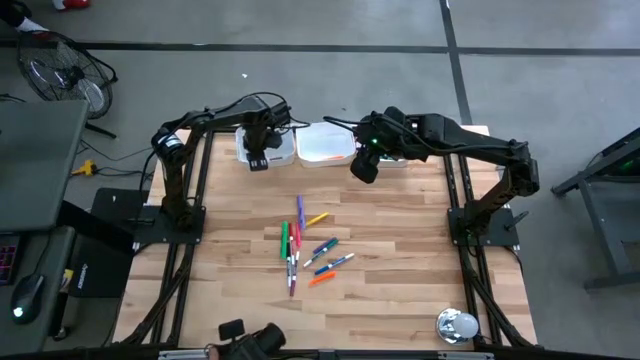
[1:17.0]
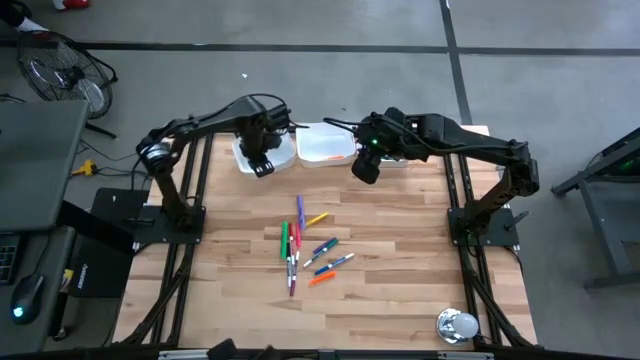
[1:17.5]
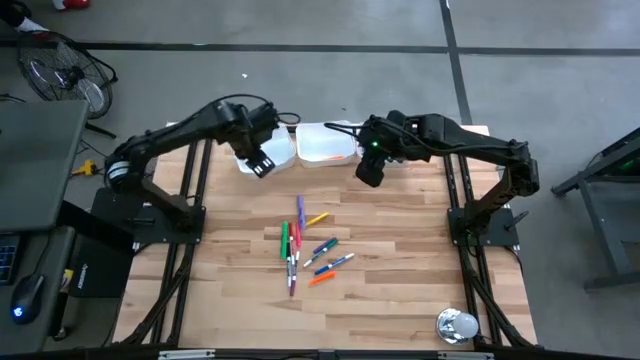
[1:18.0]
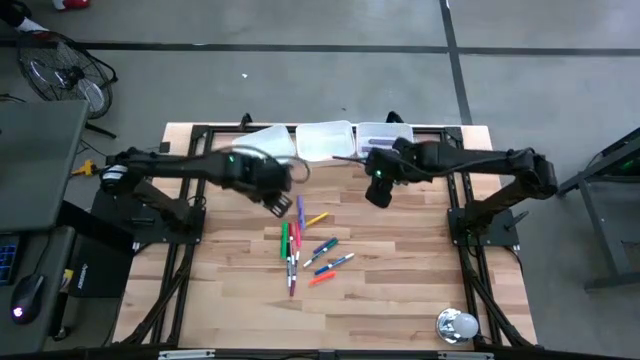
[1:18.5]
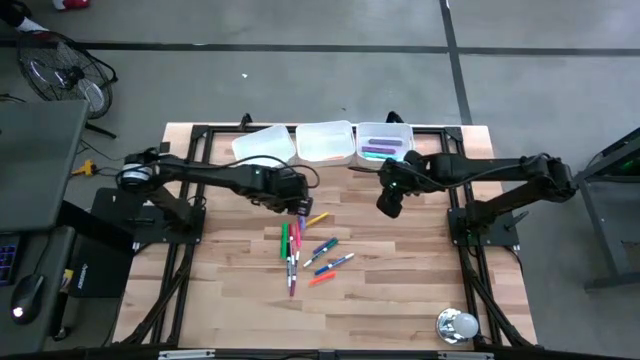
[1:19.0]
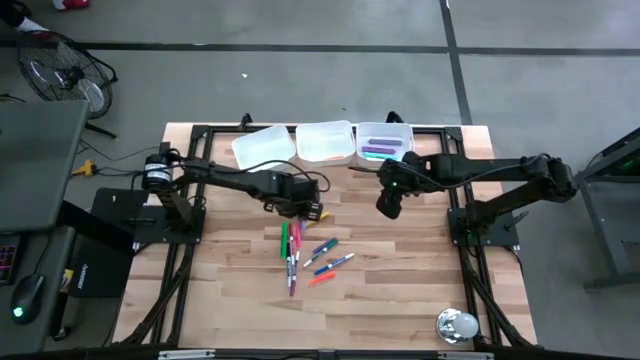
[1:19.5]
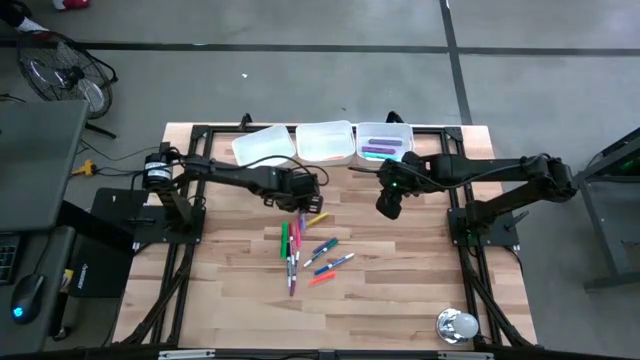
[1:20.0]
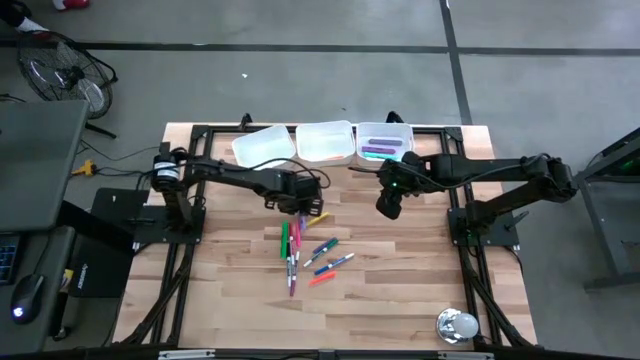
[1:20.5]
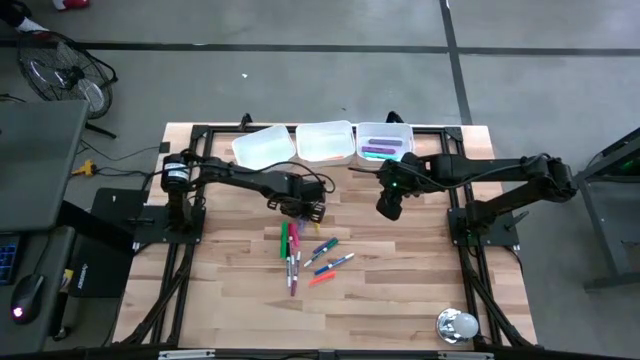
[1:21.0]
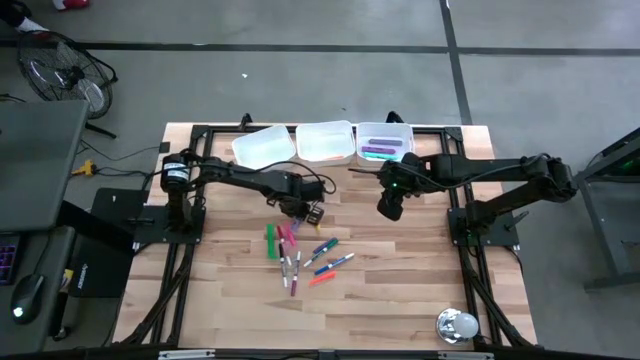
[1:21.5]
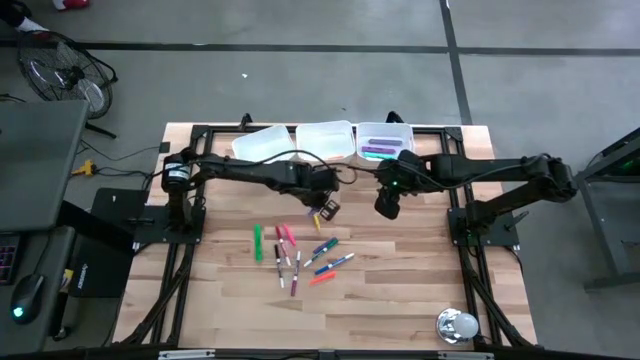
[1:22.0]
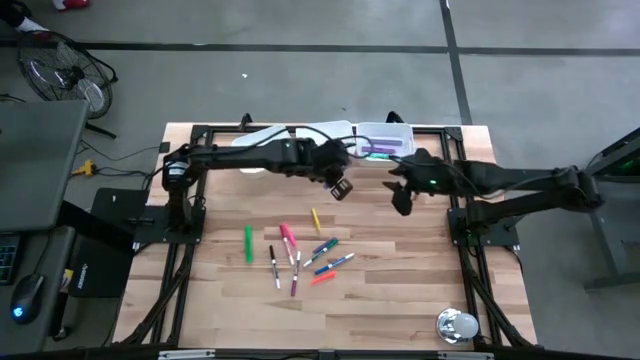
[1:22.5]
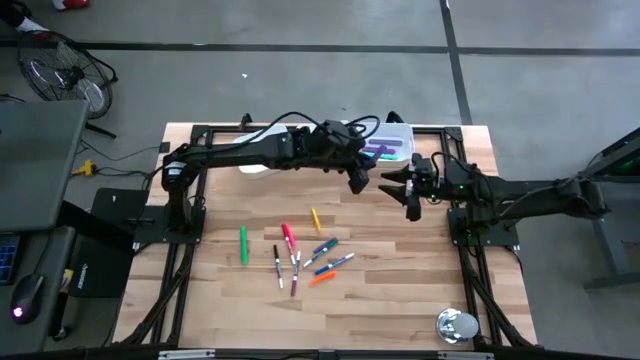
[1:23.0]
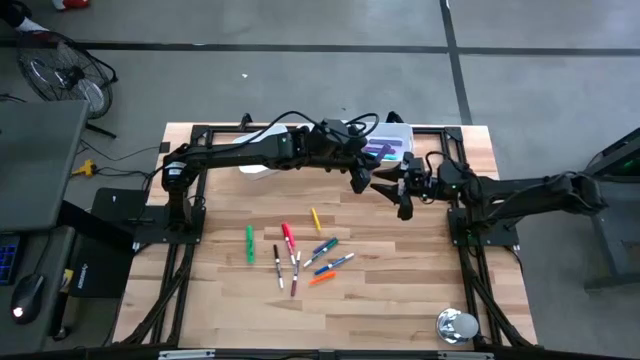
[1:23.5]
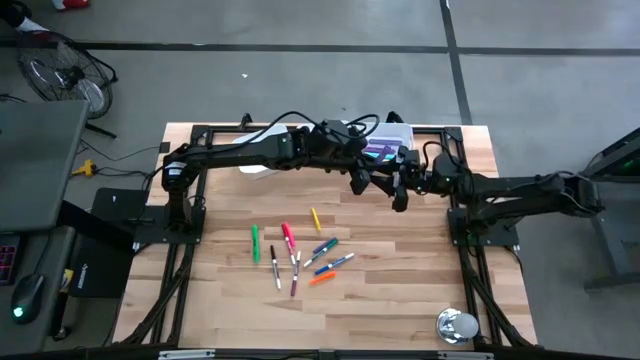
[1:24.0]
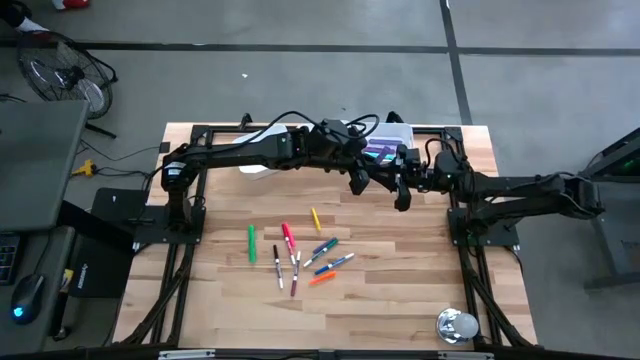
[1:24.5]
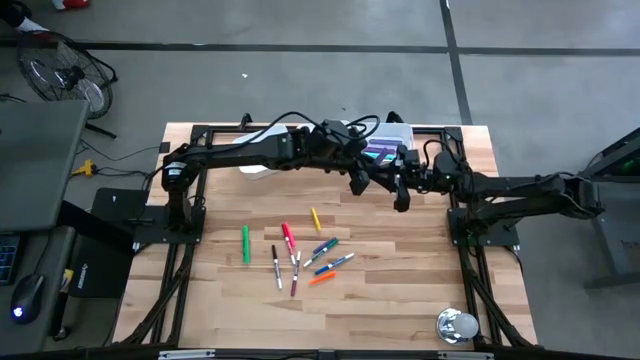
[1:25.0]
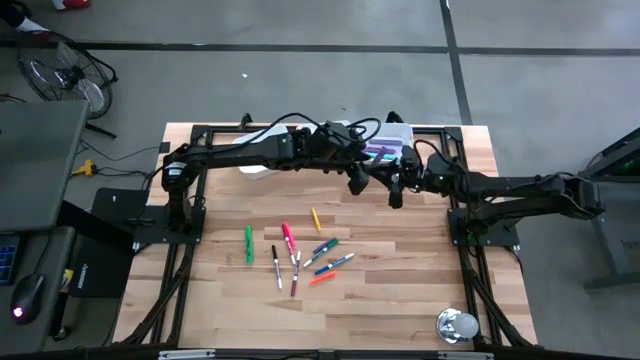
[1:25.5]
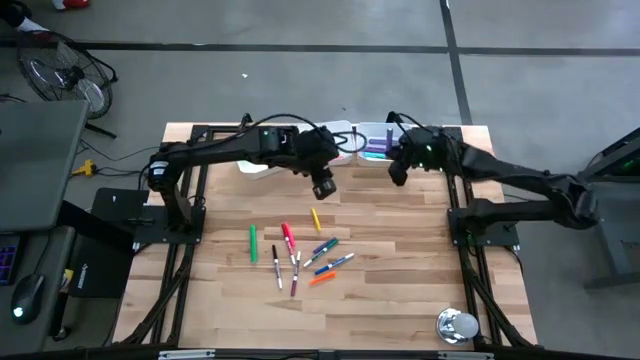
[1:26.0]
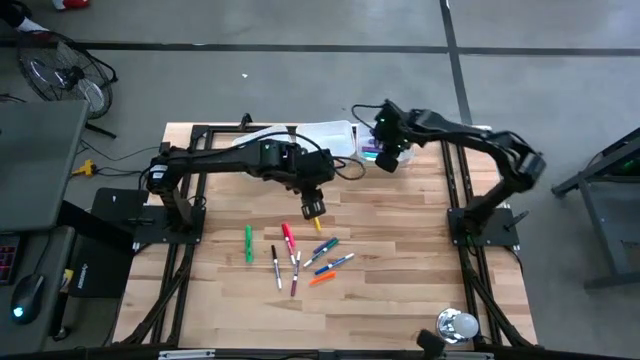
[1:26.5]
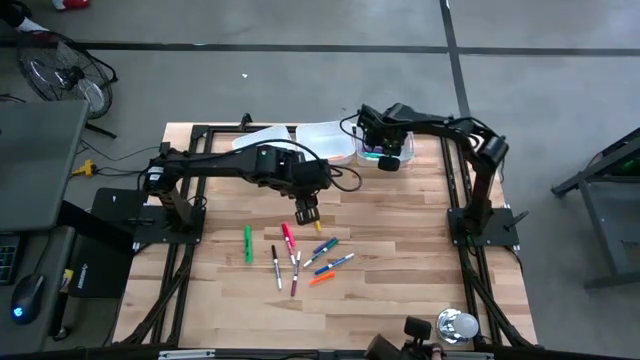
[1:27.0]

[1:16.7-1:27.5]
Task: Pick & Place Markers
Put the purple highlighter pen into the right white bin

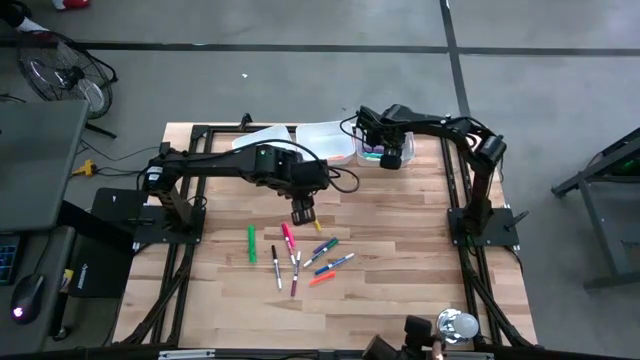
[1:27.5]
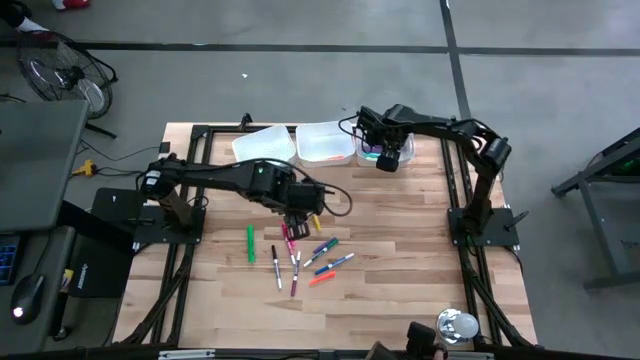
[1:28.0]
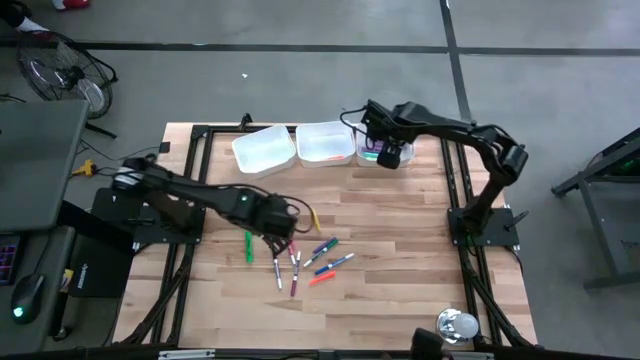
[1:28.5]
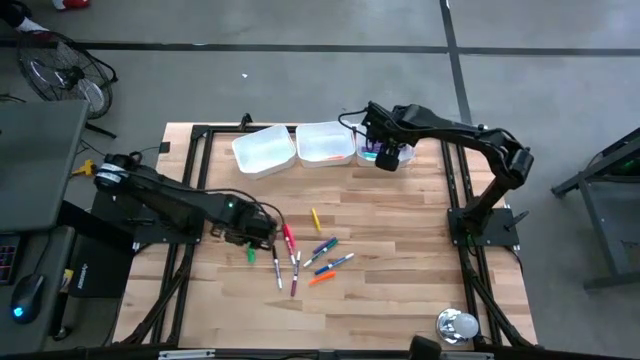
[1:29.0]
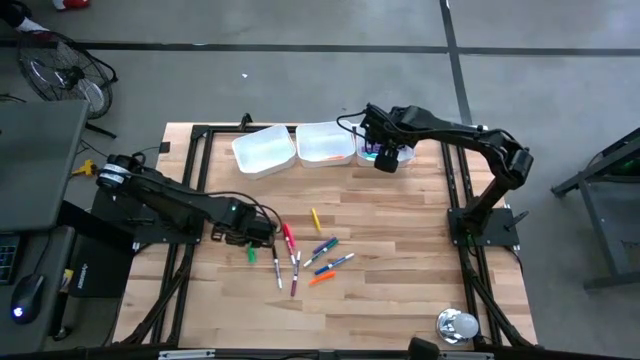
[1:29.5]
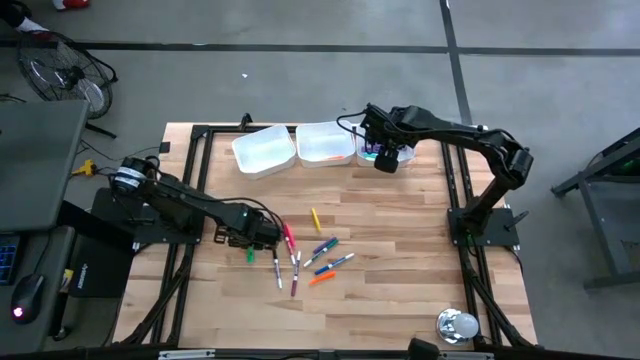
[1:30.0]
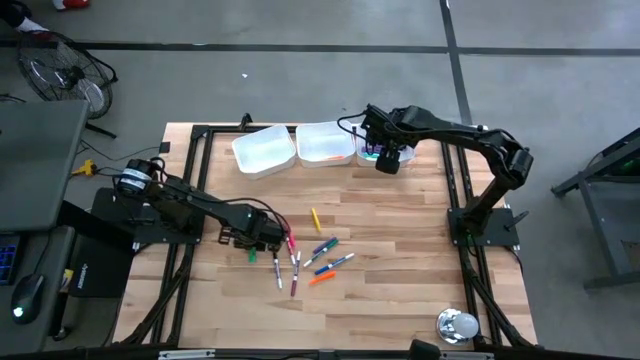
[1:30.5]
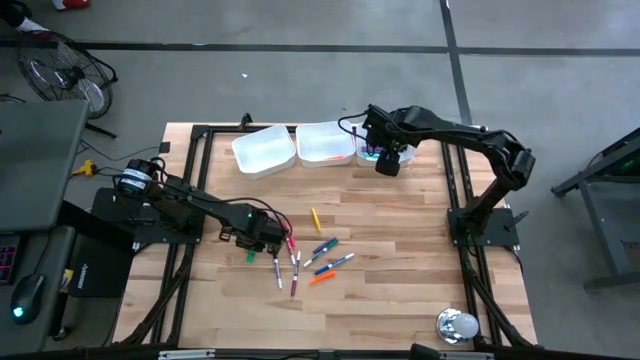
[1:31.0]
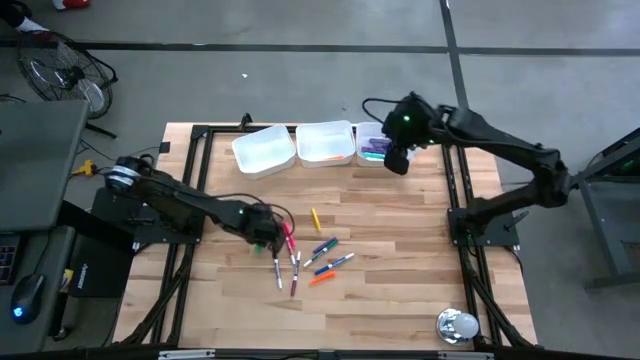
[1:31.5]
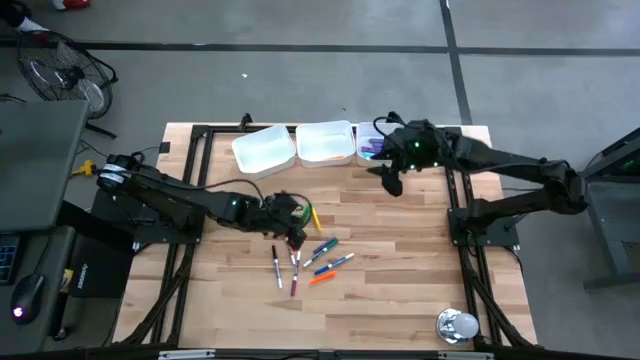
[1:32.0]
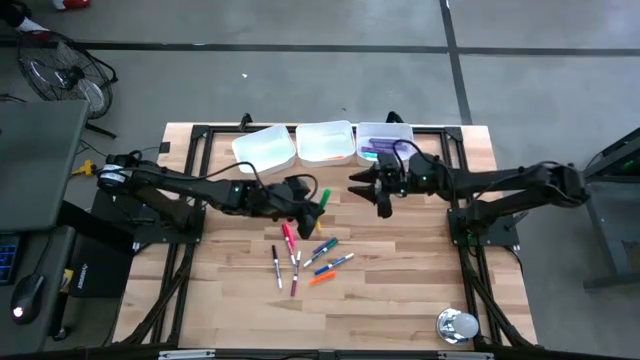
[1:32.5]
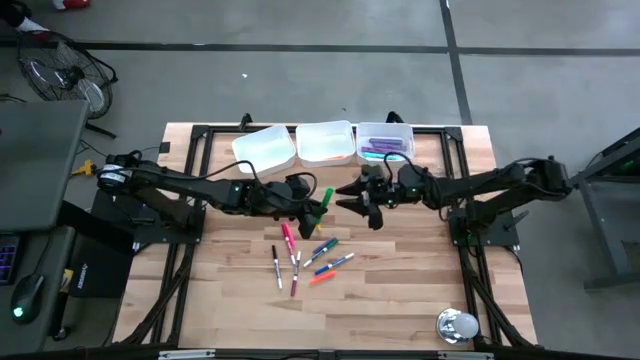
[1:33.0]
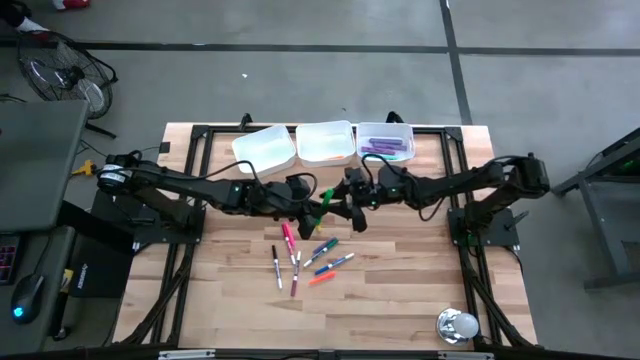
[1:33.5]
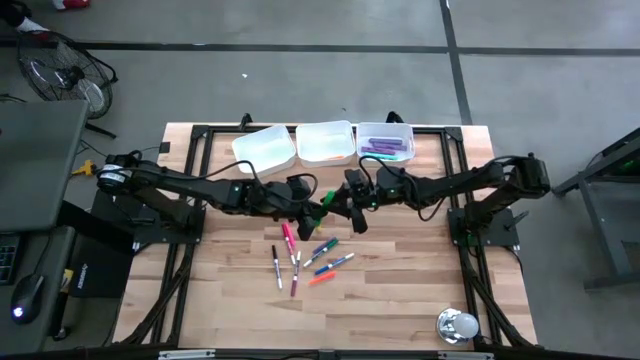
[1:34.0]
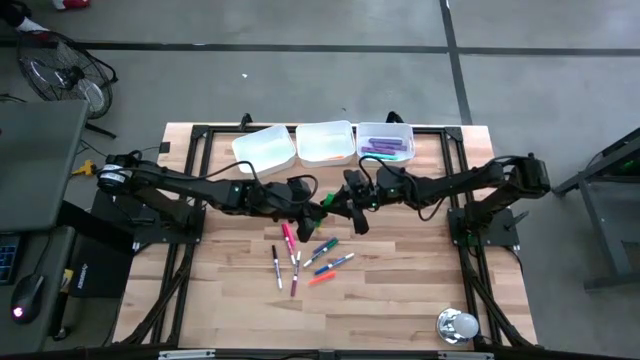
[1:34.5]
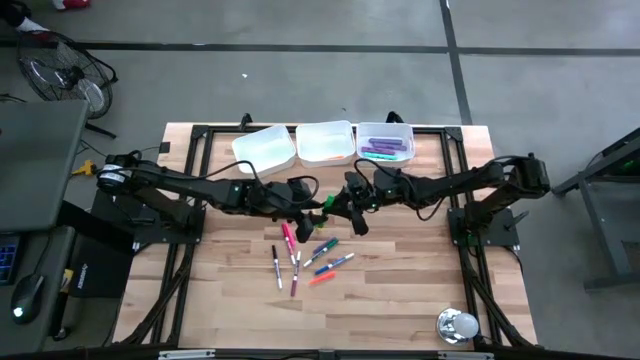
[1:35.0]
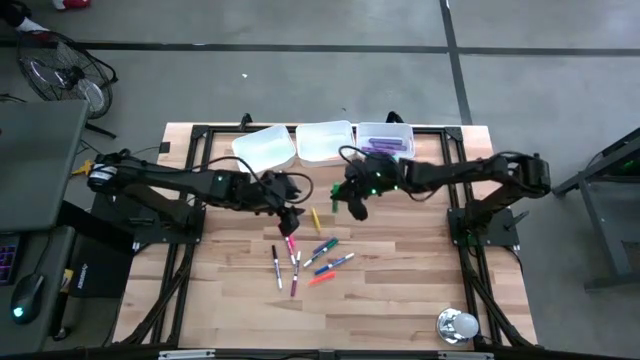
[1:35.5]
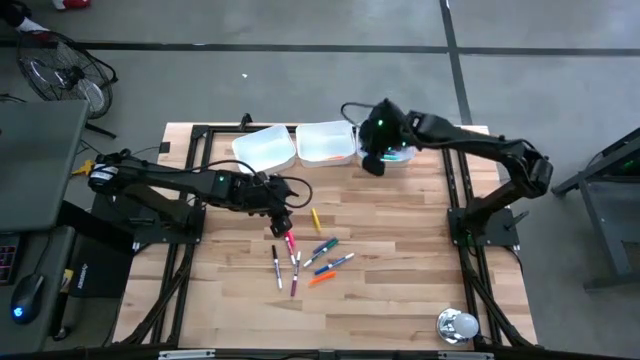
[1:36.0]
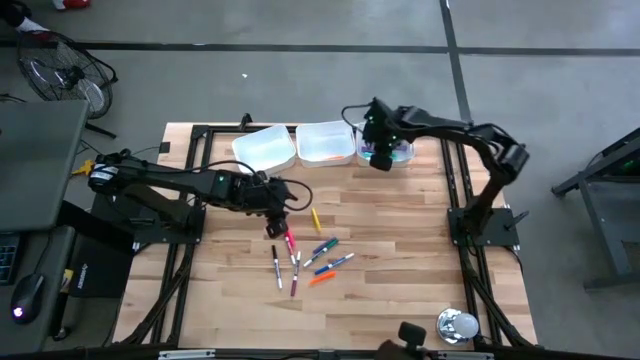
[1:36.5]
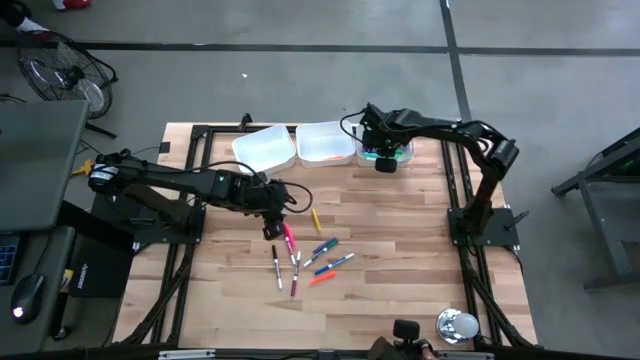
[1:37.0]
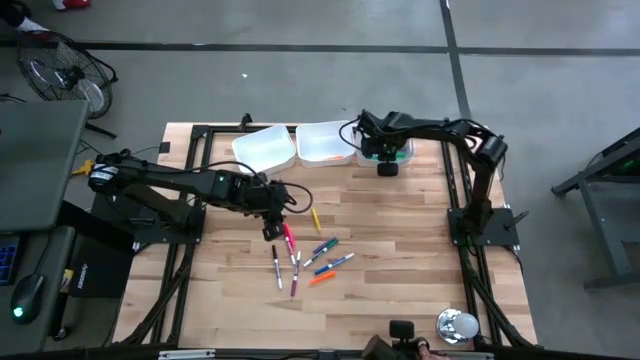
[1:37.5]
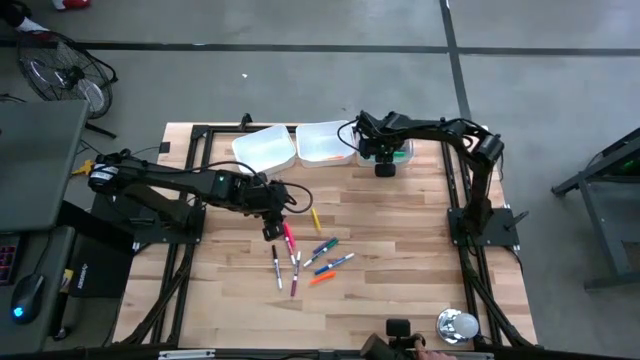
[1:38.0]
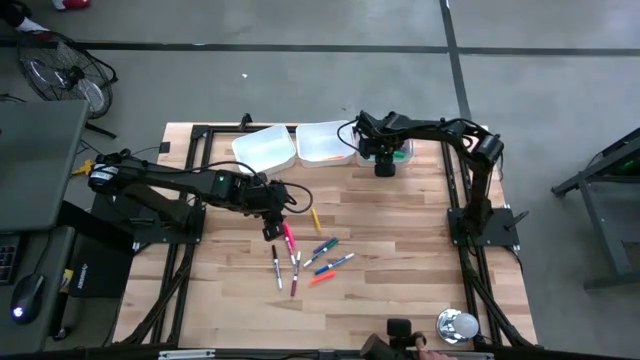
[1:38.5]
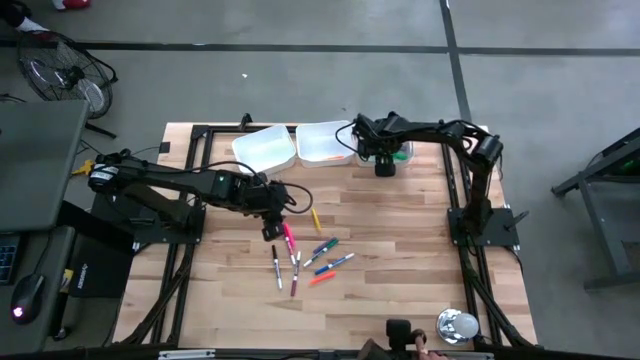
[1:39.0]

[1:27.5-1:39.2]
Put the green highlighter pen into the right white bin
